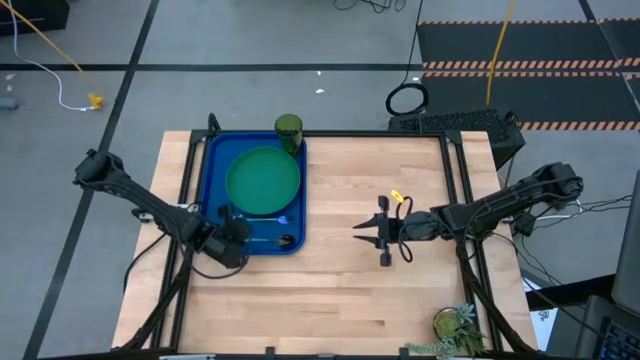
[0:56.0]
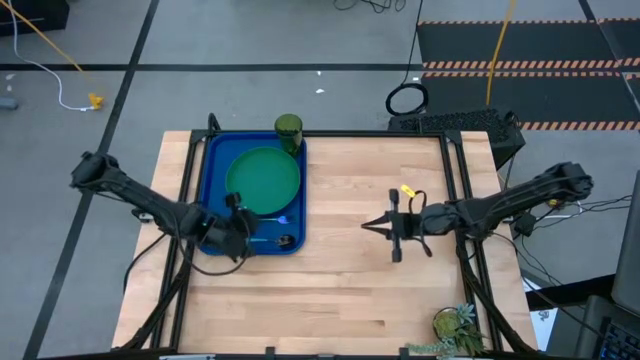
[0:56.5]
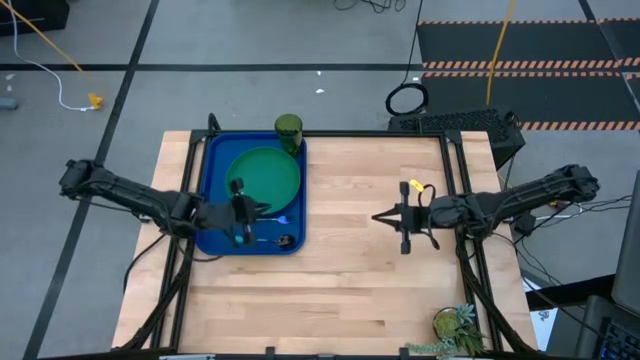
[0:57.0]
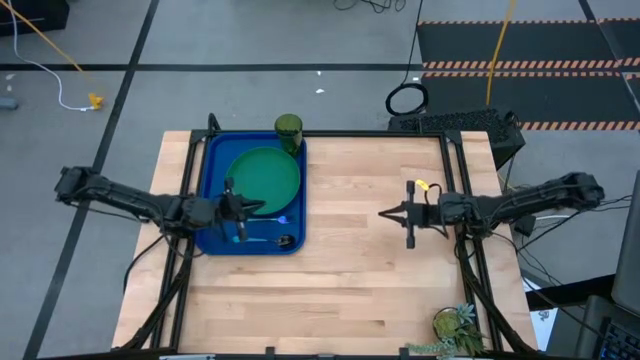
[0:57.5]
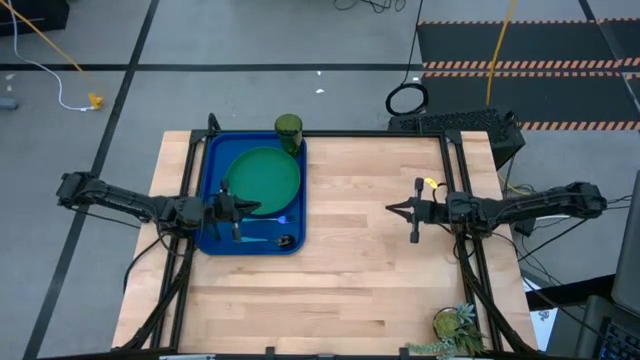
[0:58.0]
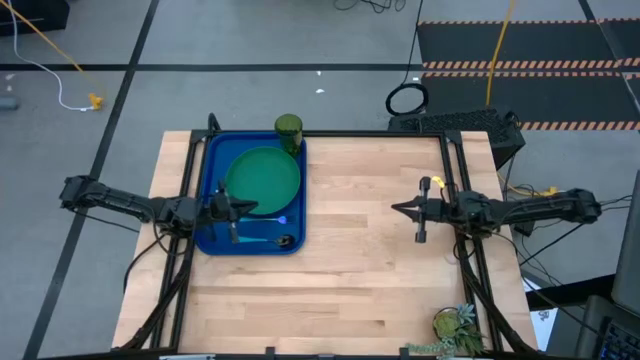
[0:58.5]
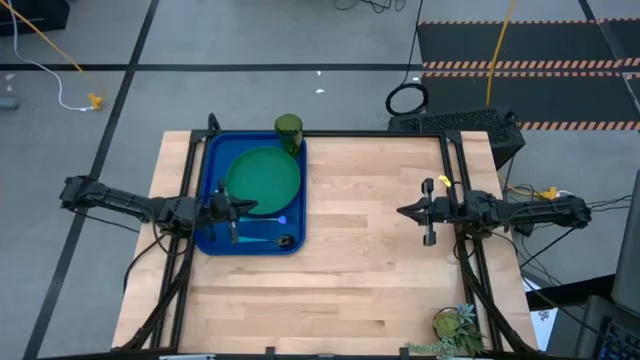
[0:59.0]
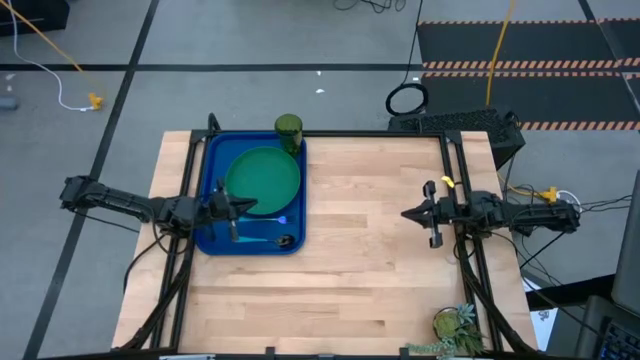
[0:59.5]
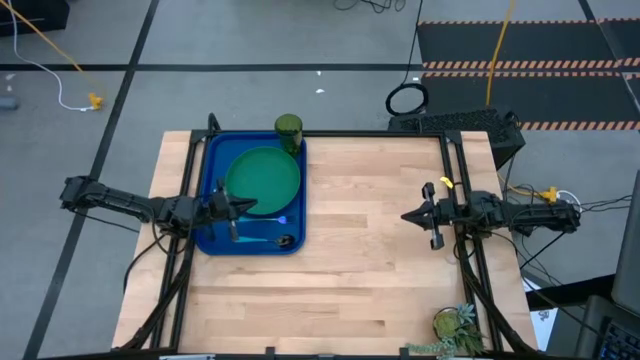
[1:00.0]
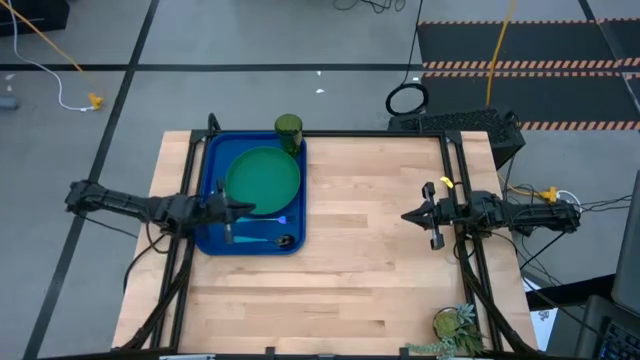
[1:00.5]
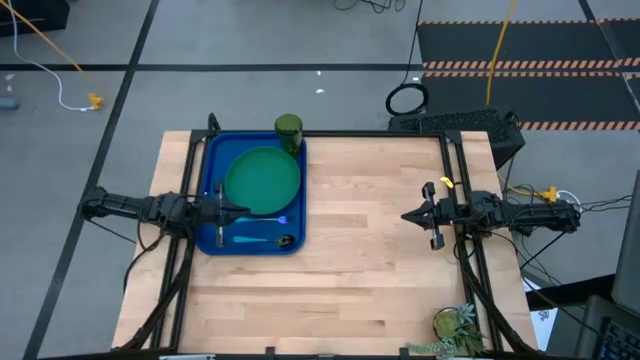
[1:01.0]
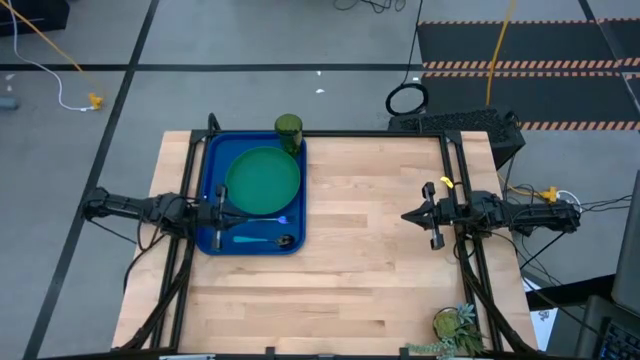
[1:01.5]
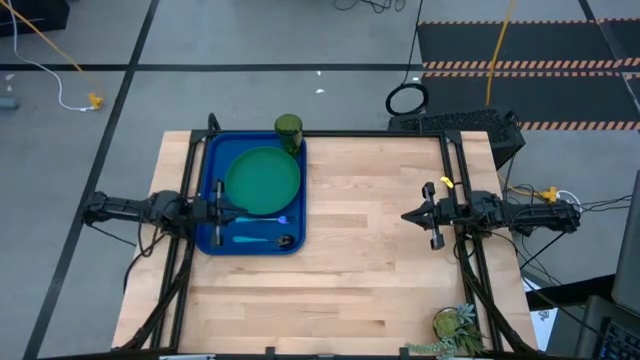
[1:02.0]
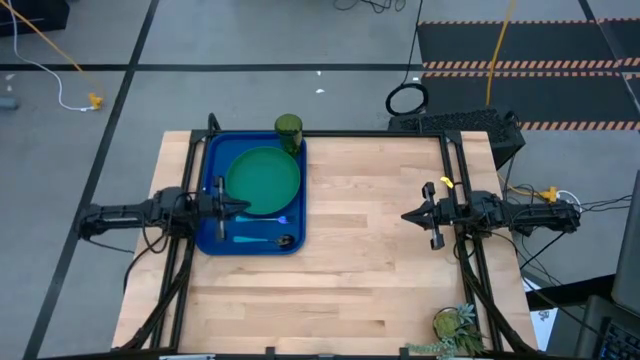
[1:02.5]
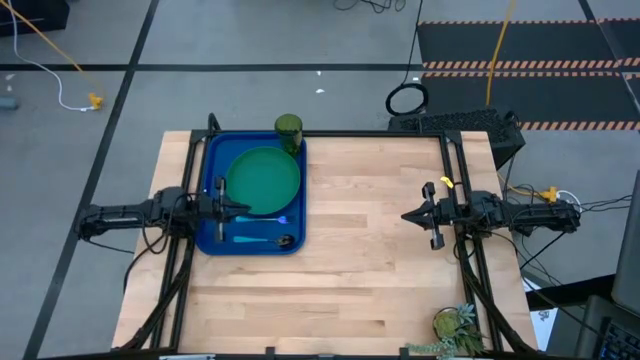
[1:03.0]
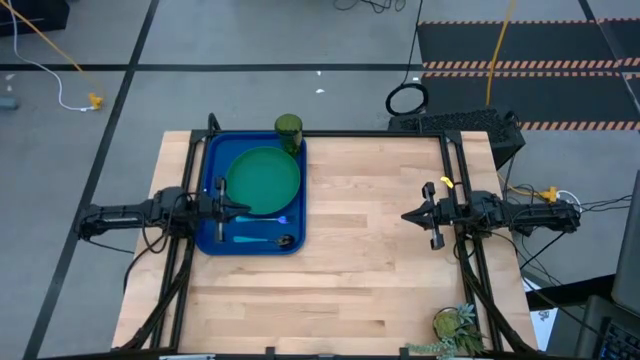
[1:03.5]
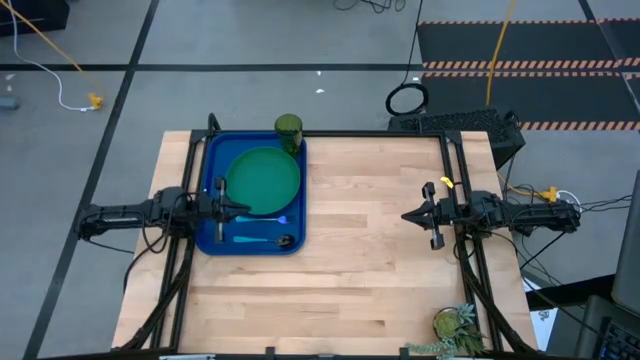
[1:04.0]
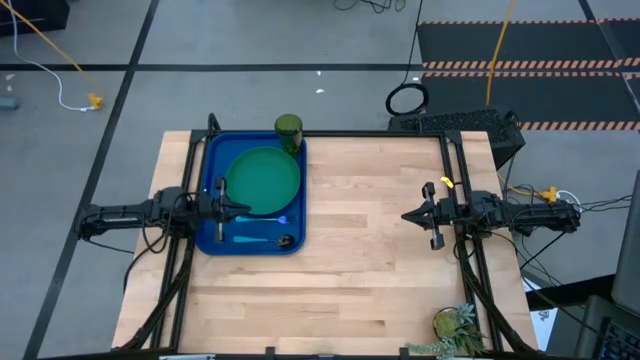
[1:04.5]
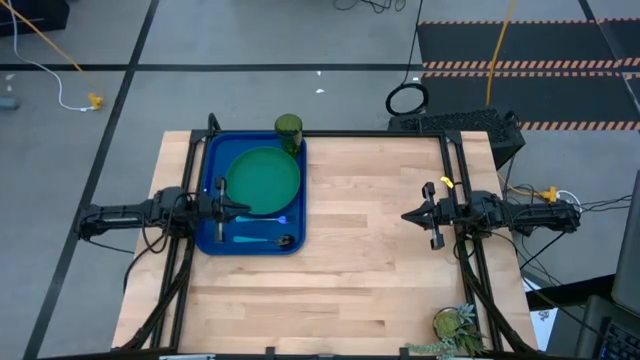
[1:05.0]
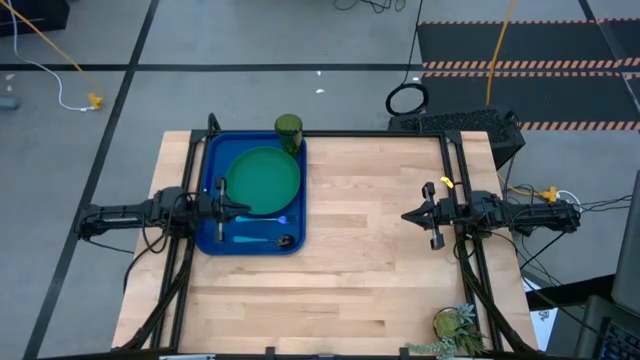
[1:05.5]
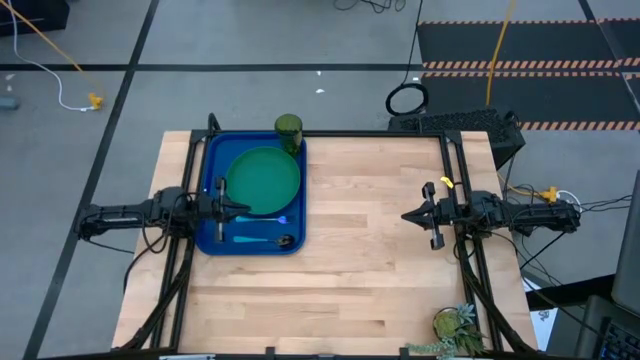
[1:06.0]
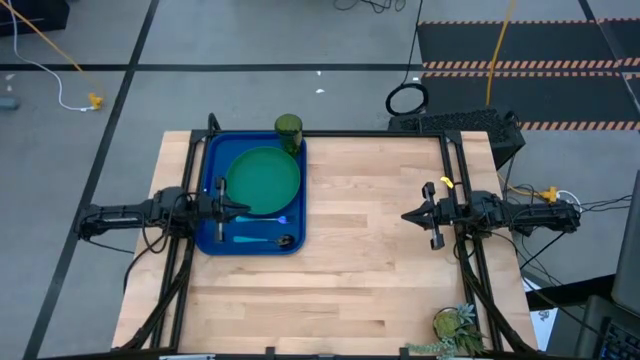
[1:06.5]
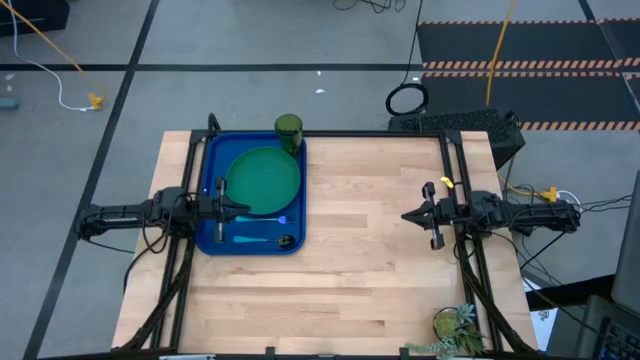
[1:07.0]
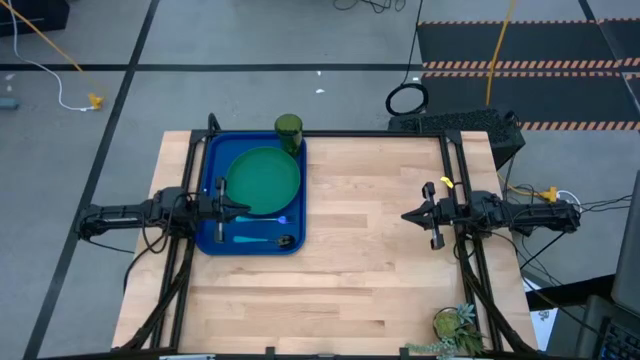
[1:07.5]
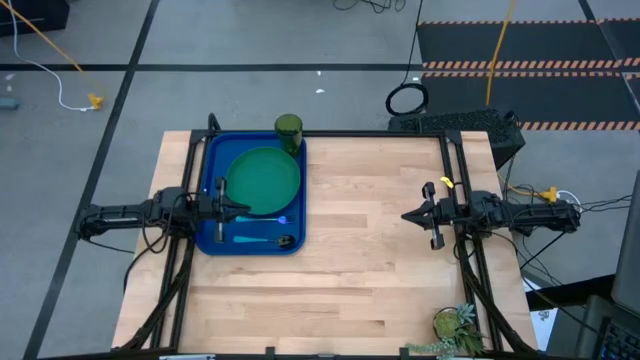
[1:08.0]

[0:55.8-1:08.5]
Task: Pick and place plate/cup/fork/spoon on tray
Return to Home Position

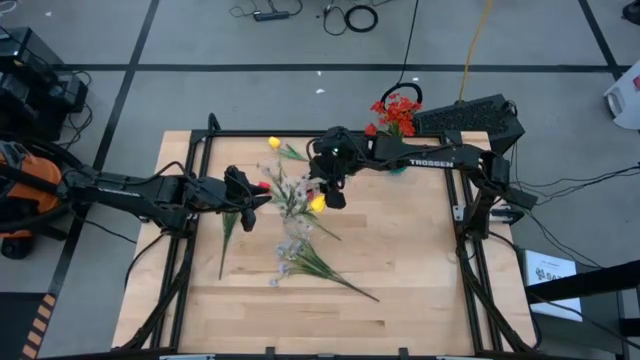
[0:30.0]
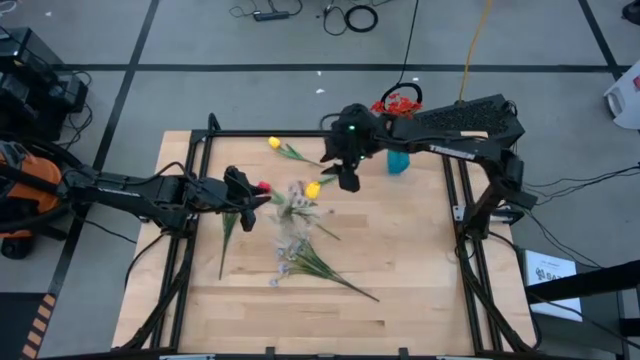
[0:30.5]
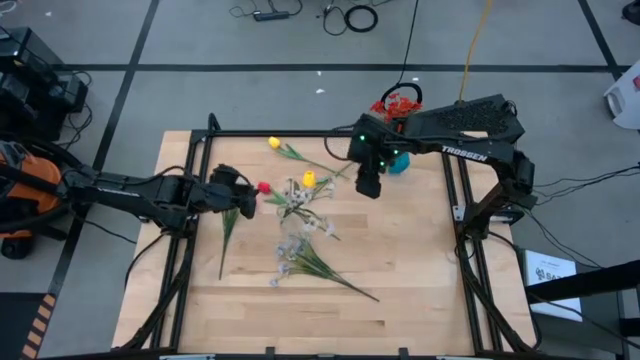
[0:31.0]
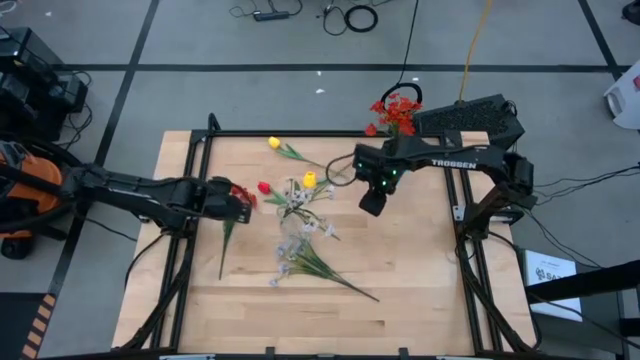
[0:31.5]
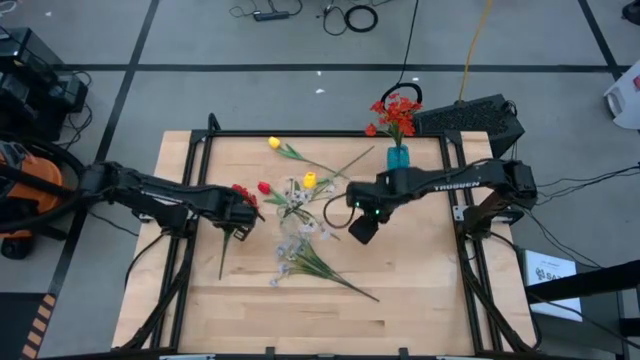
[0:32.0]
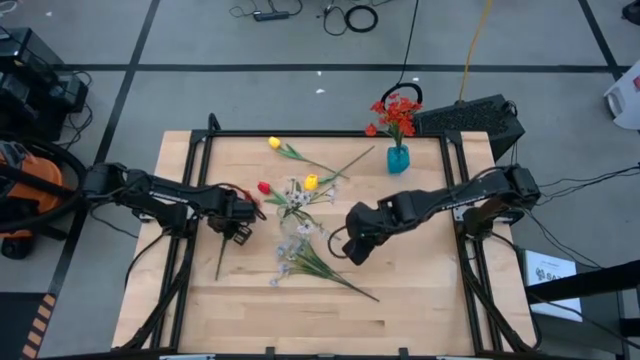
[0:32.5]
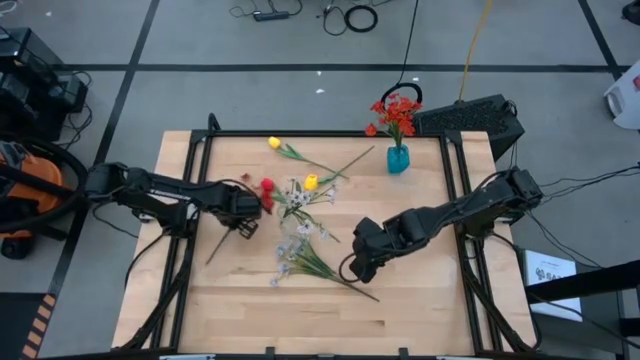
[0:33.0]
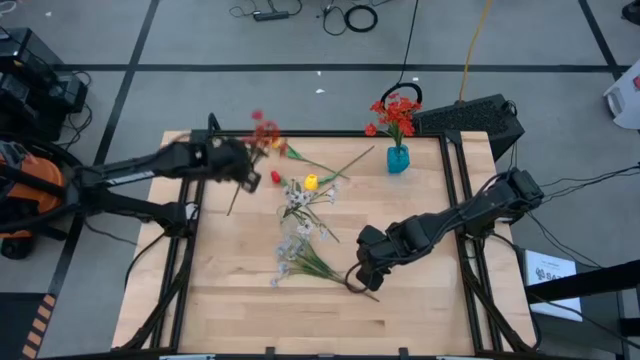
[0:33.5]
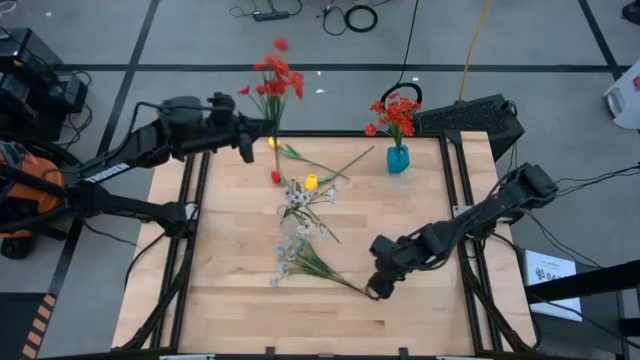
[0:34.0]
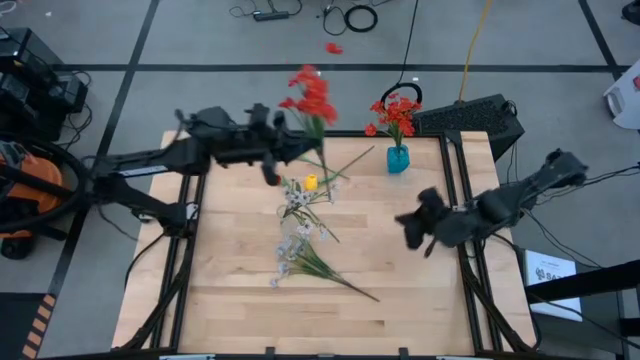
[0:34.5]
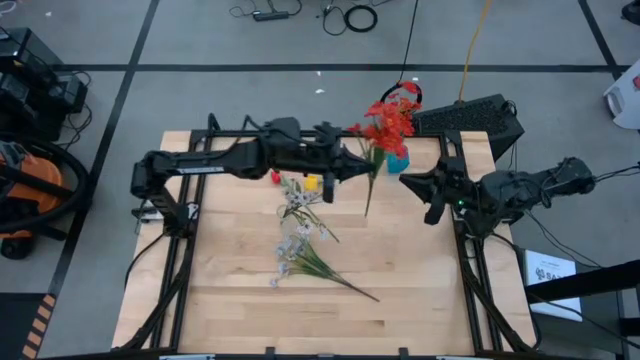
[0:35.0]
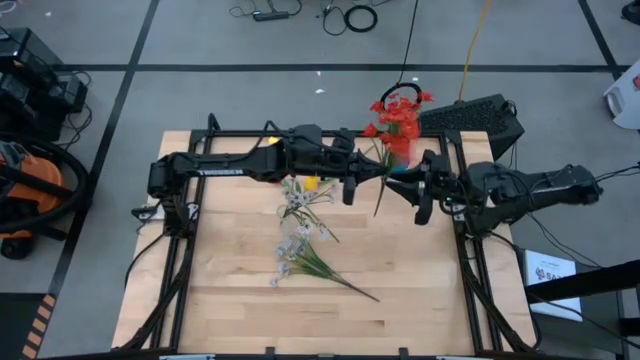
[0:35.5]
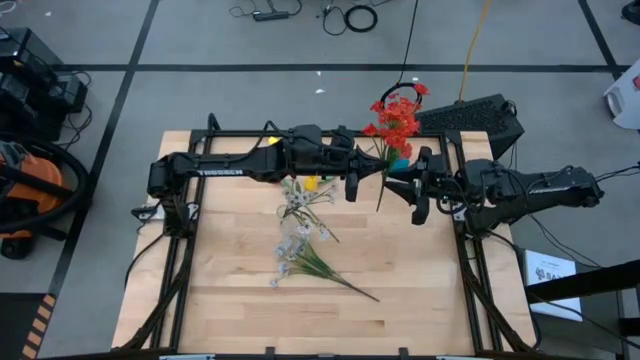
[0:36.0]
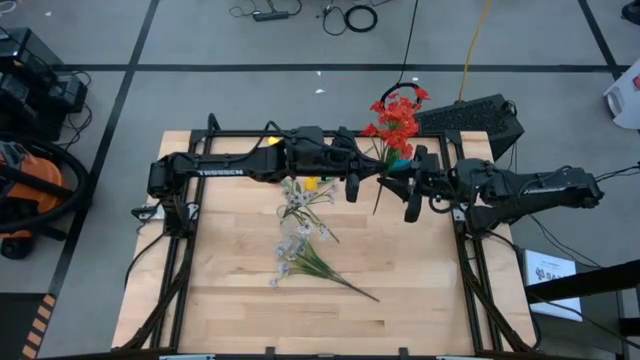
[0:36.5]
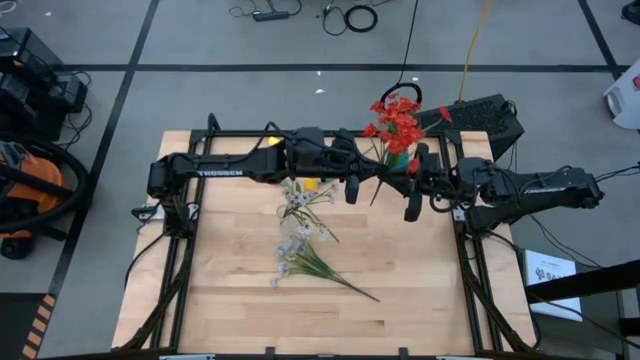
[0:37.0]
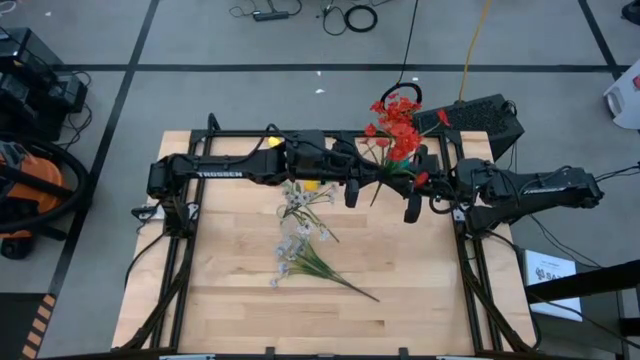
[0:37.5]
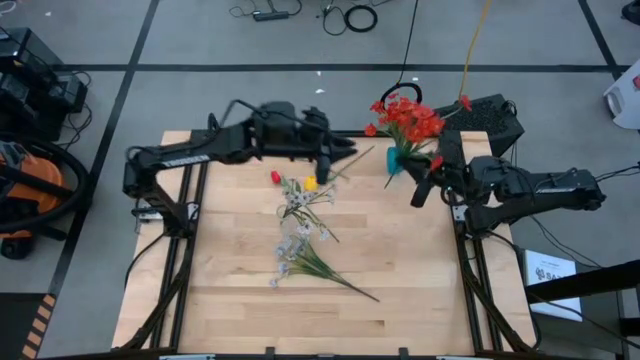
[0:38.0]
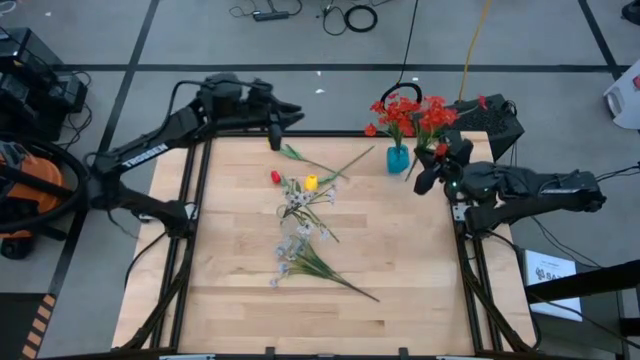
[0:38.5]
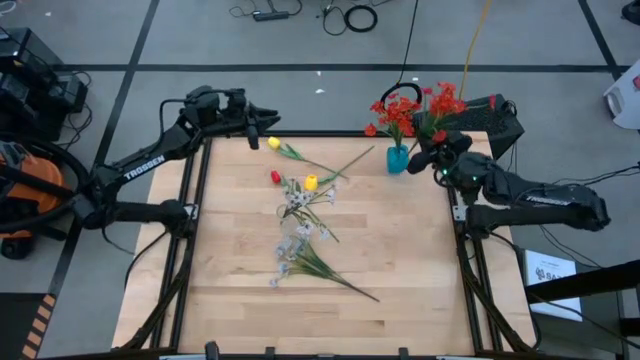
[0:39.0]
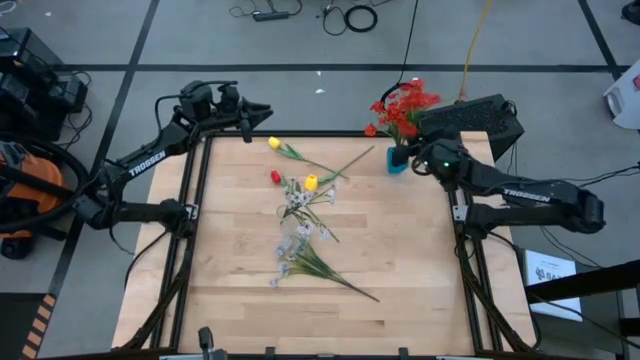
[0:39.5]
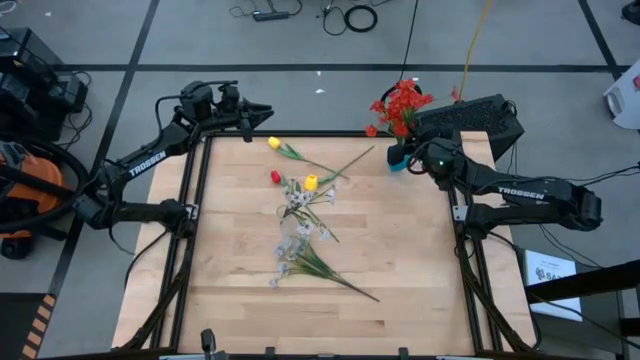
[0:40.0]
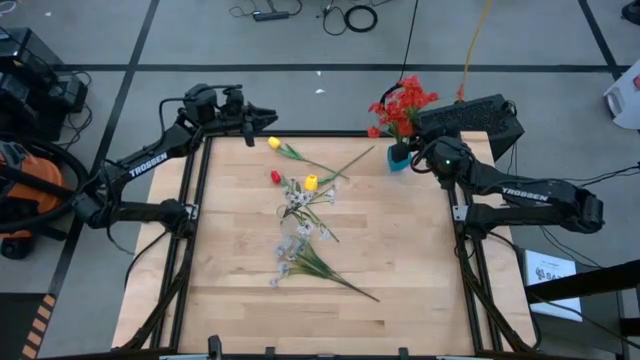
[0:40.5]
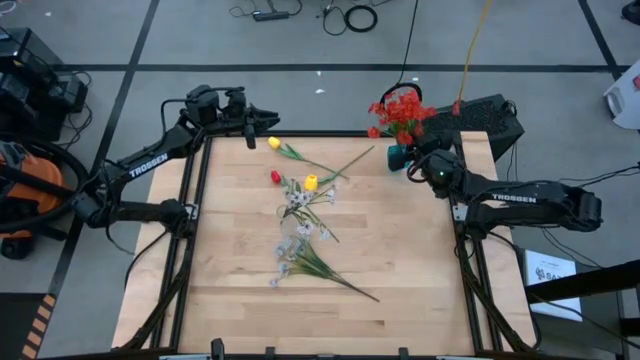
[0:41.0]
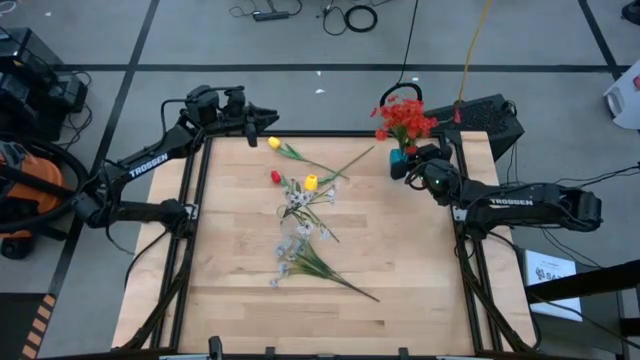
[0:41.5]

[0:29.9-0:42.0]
Task: Sort flowers into vase by color
Put the orange flowers into the blue flower vase
